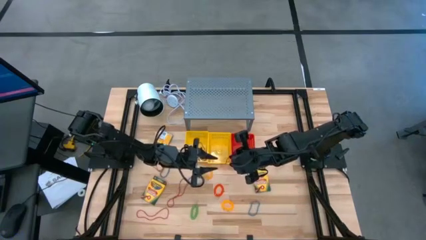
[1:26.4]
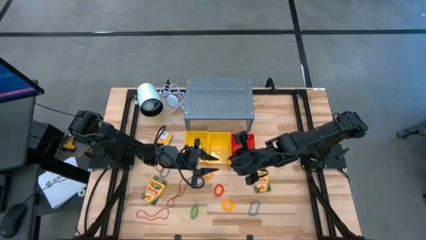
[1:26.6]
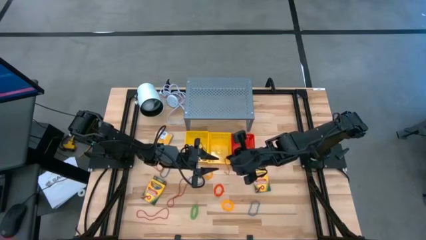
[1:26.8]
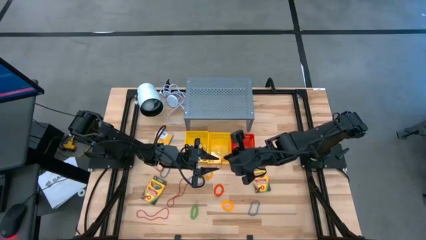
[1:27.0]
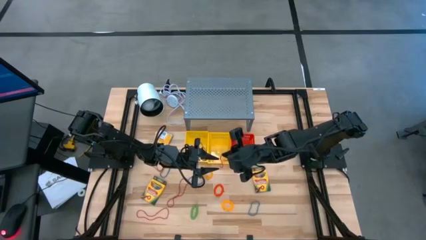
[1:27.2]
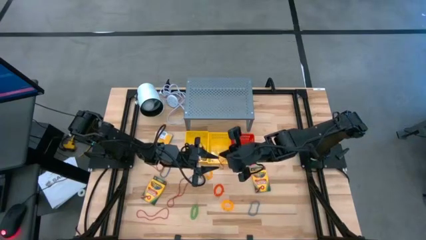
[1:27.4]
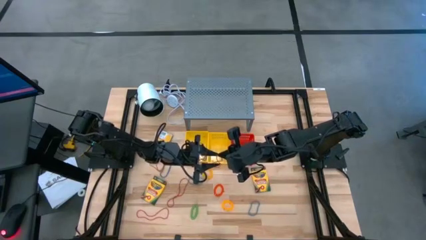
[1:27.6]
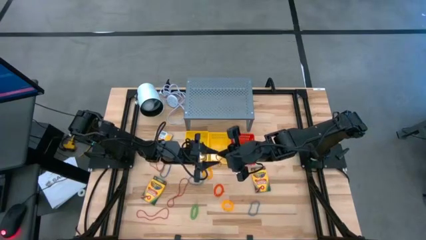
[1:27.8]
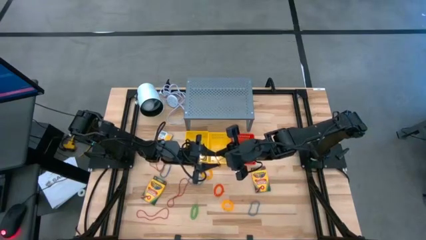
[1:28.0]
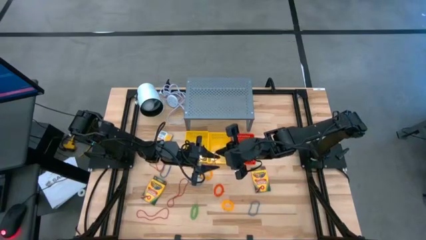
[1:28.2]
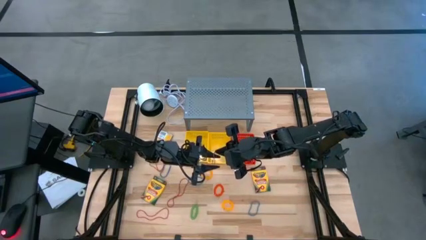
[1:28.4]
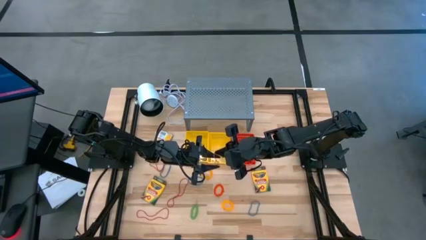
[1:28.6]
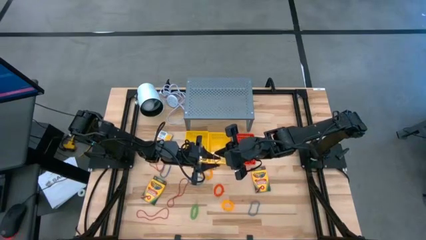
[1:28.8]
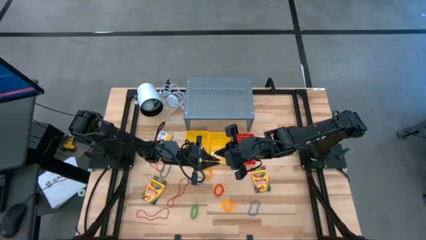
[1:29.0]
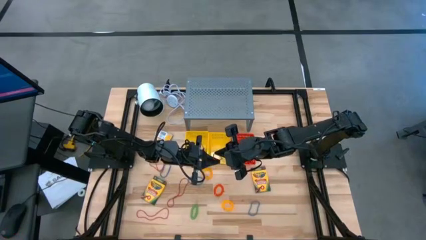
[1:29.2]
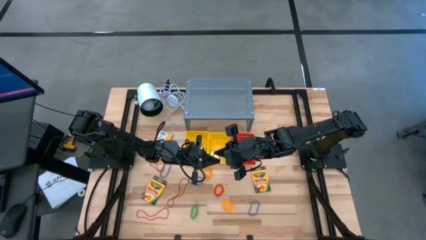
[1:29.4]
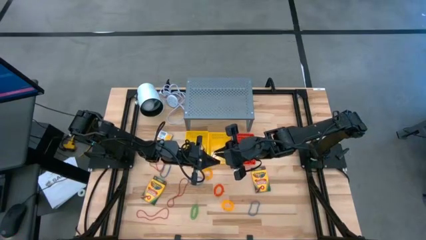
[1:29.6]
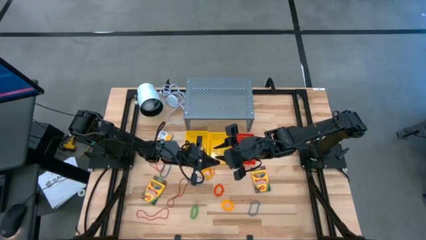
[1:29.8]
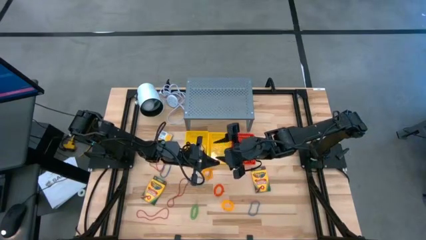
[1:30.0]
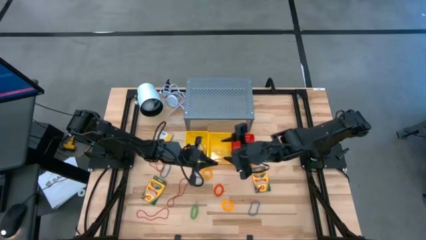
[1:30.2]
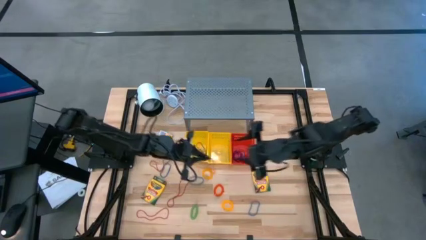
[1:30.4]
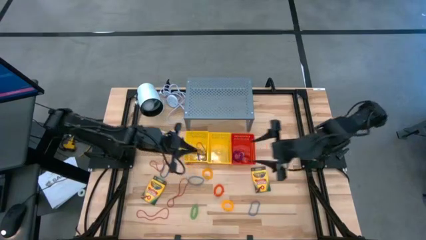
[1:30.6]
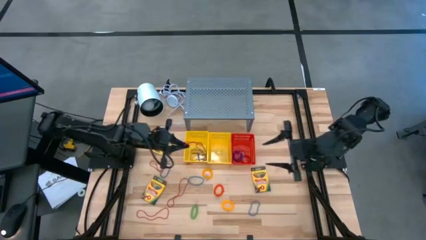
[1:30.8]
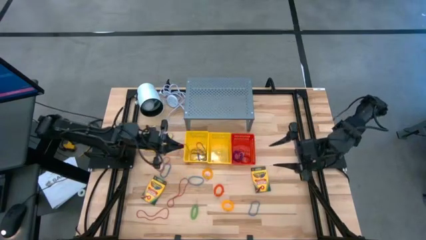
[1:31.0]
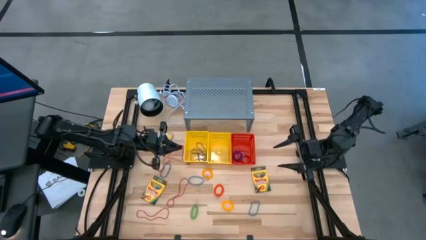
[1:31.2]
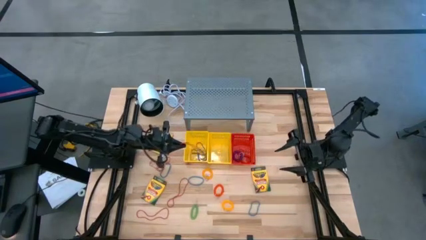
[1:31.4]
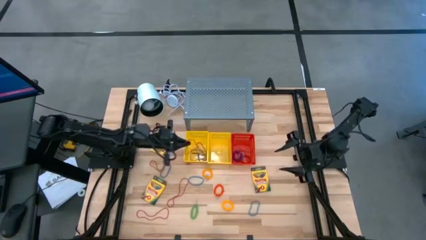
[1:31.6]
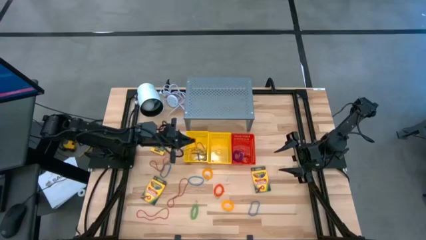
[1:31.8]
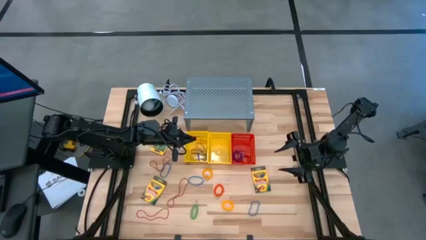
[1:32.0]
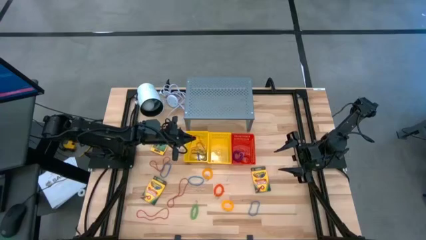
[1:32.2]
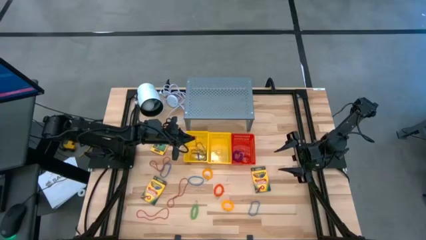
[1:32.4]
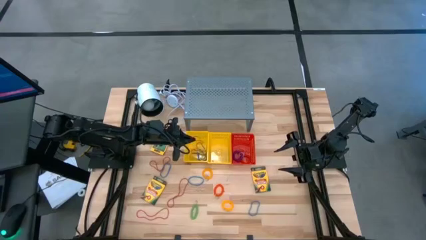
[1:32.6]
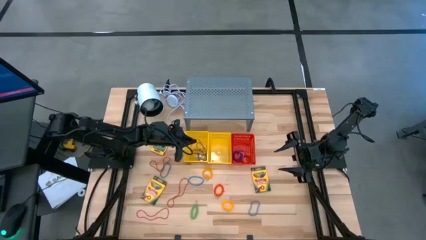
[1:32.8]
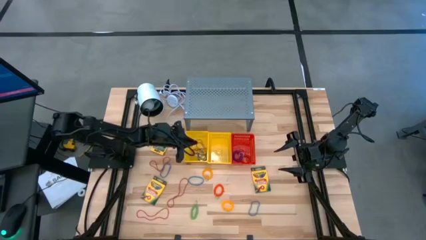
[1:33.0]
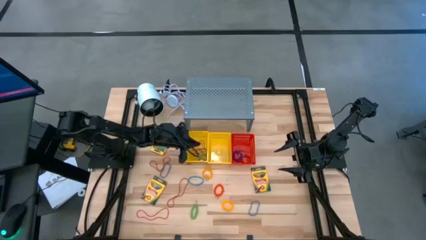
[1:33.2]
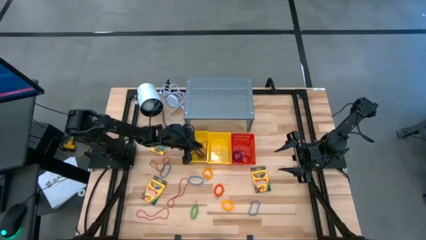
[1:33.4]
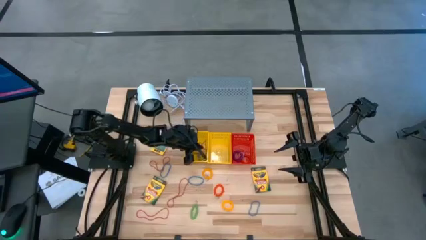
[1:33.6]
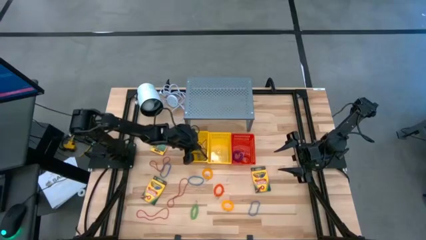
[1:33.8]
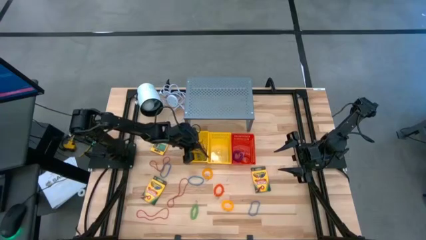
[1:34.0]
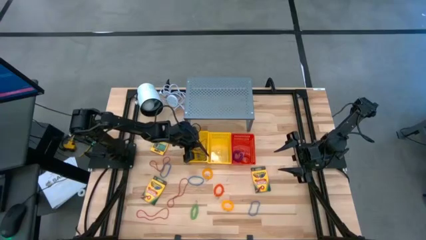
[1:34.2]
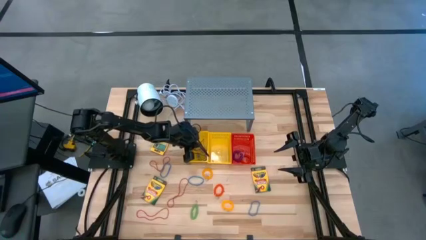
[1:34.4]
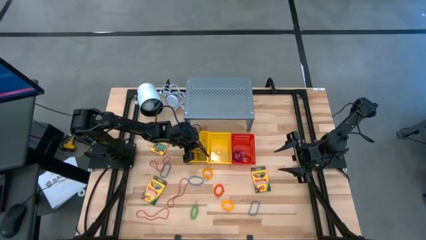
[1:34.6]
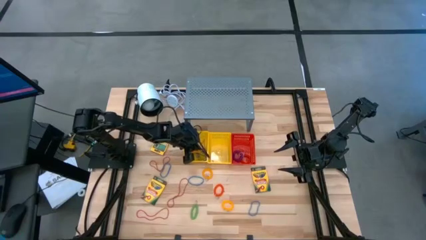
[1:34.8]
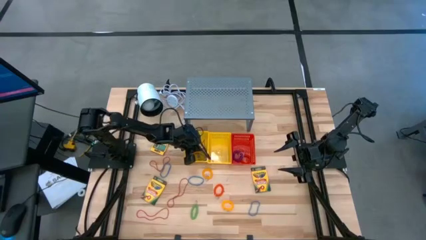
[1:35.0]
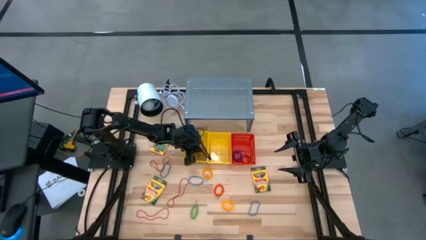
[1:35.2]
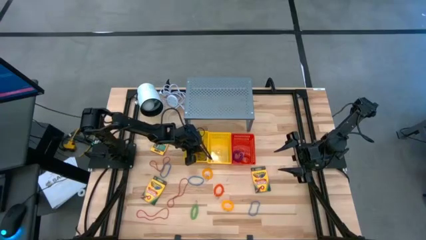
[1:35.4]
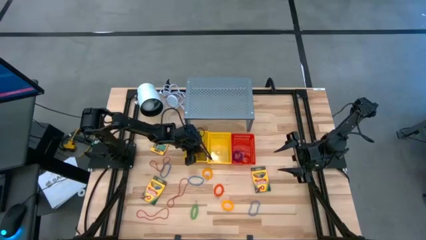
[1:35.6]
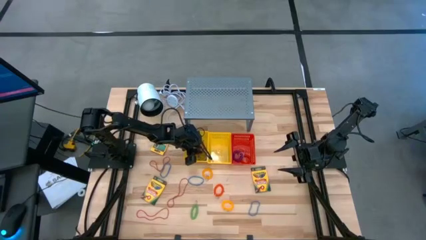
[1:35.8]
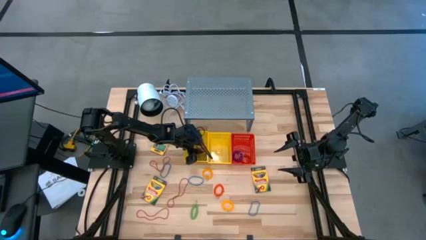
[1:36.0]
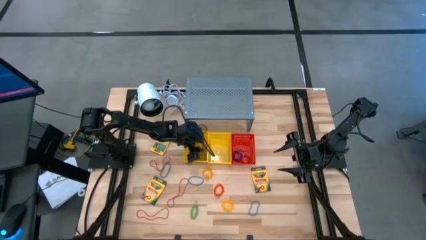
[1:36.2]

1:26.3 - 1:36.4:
Task: Pick & Place Office Desk Supplies
Put the red rubber band into the left yellow basket

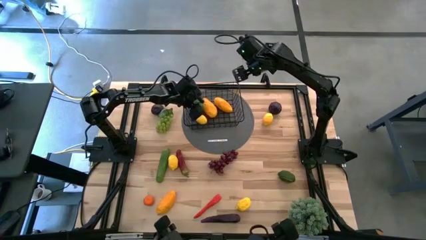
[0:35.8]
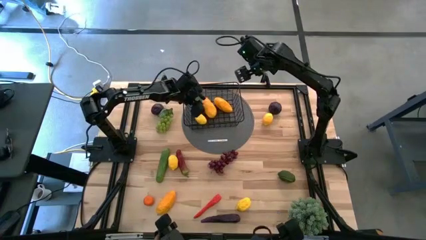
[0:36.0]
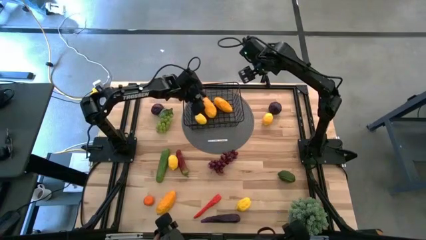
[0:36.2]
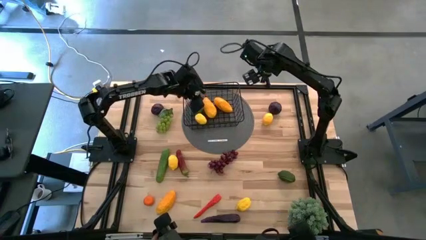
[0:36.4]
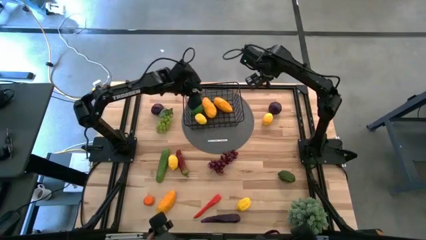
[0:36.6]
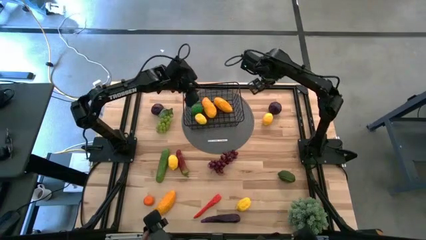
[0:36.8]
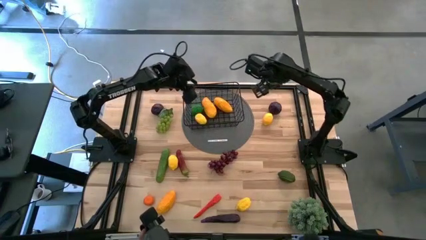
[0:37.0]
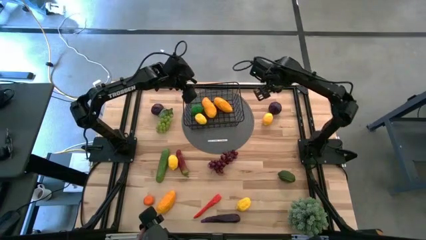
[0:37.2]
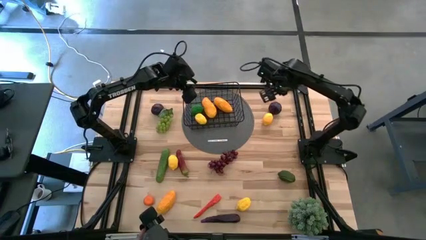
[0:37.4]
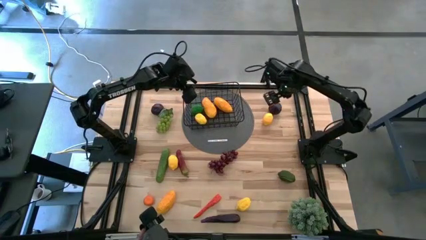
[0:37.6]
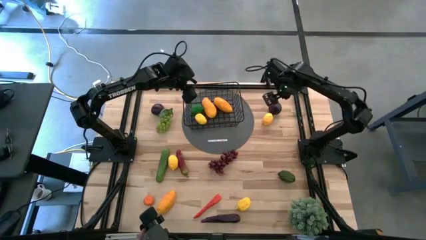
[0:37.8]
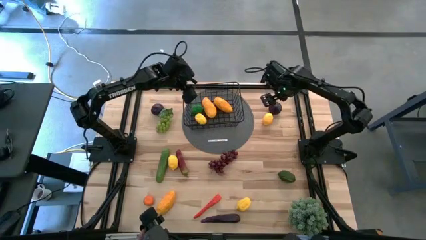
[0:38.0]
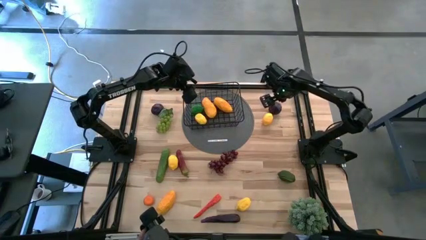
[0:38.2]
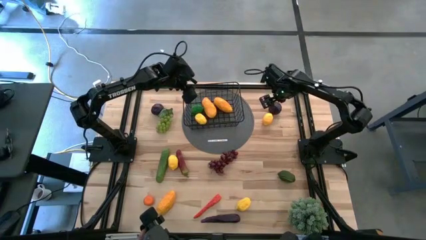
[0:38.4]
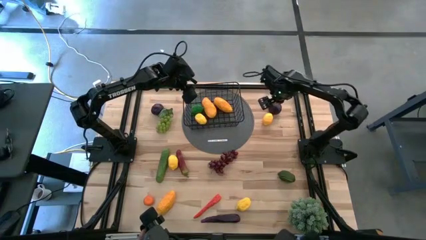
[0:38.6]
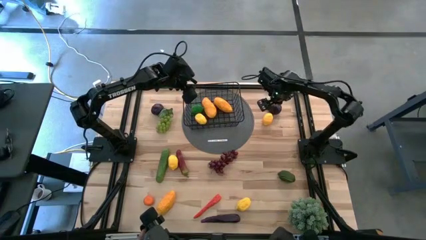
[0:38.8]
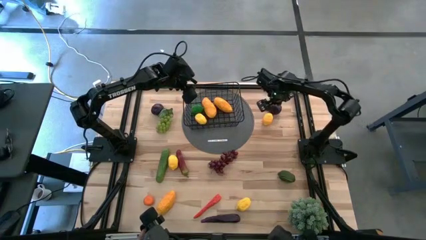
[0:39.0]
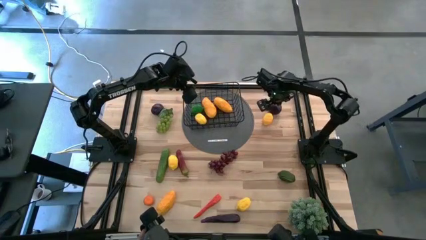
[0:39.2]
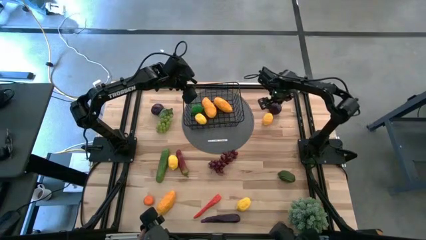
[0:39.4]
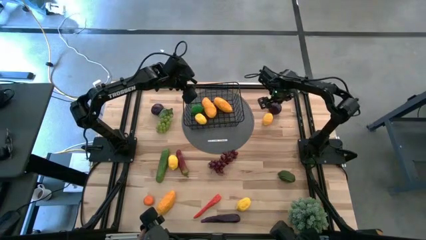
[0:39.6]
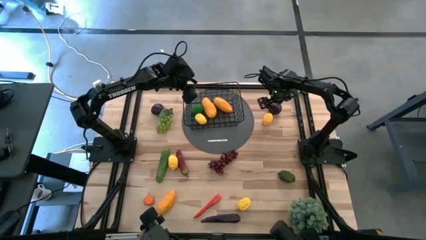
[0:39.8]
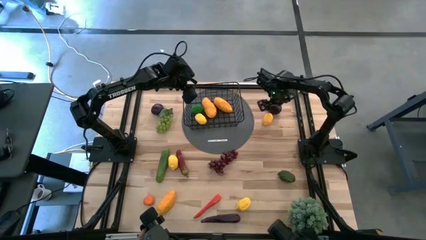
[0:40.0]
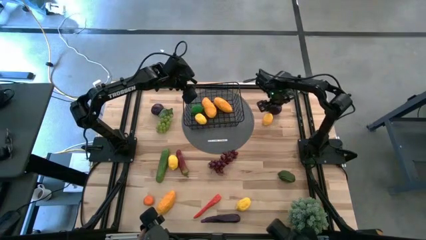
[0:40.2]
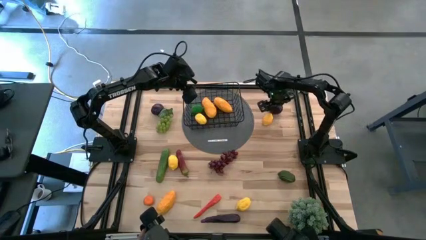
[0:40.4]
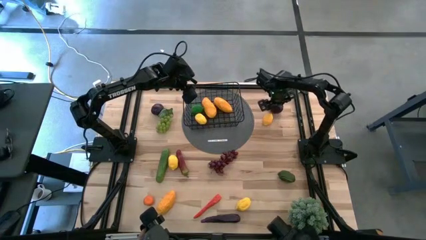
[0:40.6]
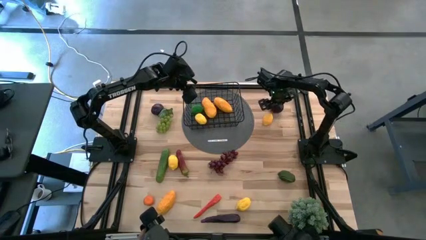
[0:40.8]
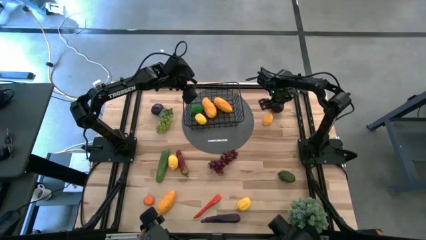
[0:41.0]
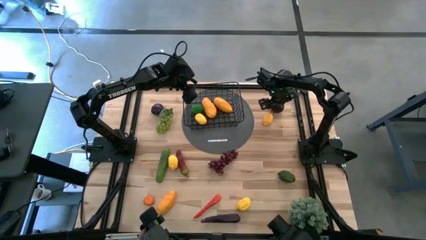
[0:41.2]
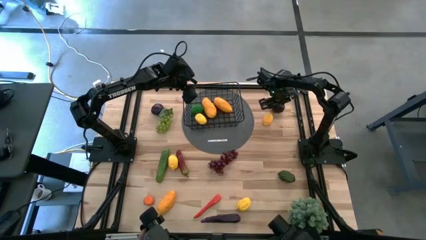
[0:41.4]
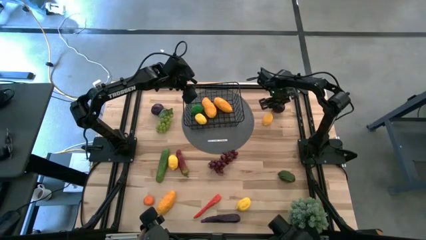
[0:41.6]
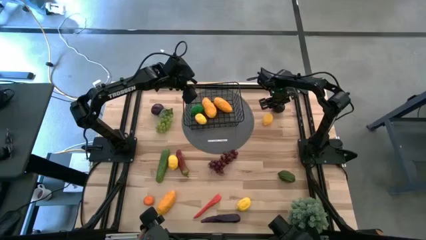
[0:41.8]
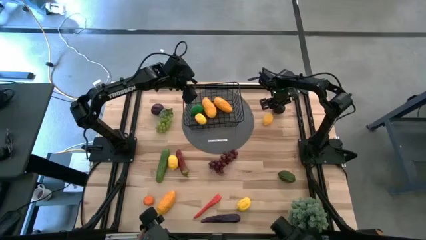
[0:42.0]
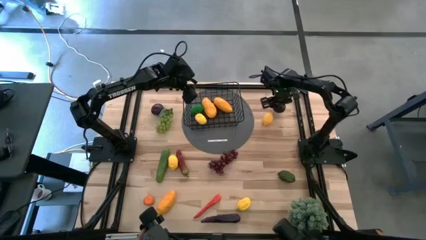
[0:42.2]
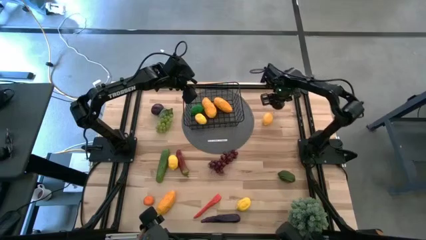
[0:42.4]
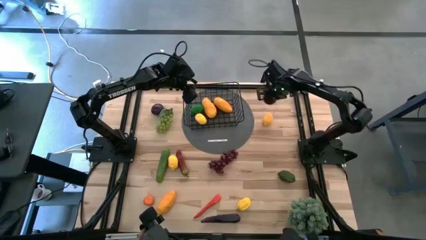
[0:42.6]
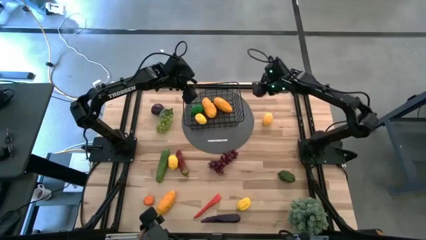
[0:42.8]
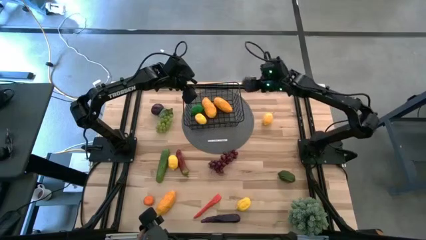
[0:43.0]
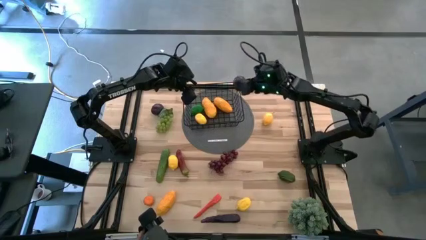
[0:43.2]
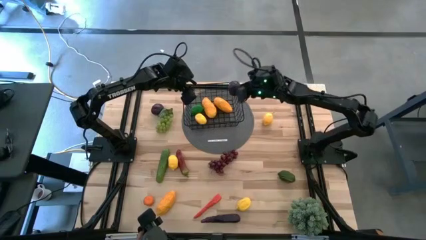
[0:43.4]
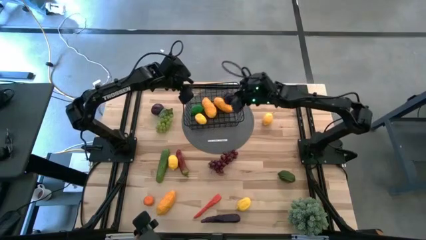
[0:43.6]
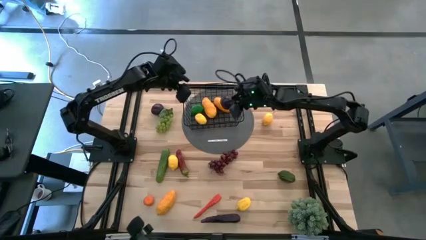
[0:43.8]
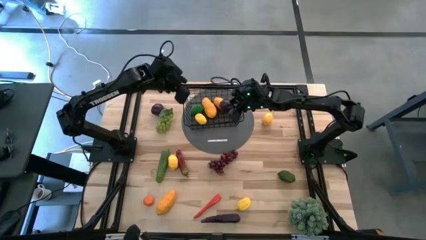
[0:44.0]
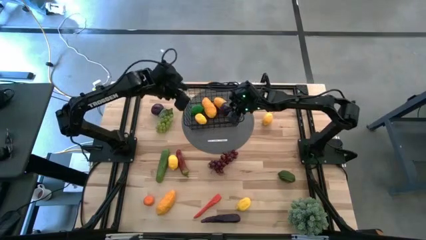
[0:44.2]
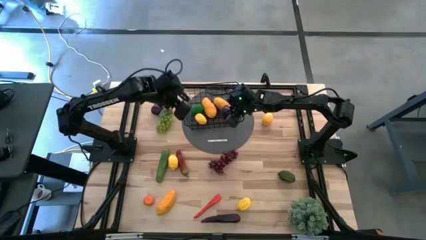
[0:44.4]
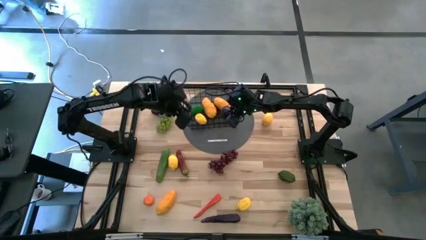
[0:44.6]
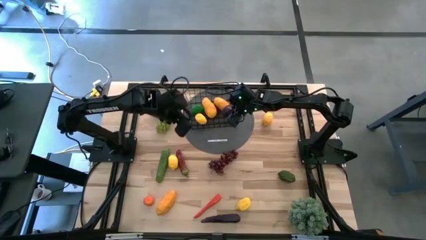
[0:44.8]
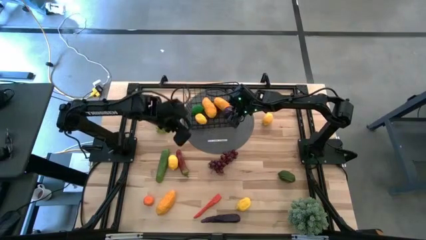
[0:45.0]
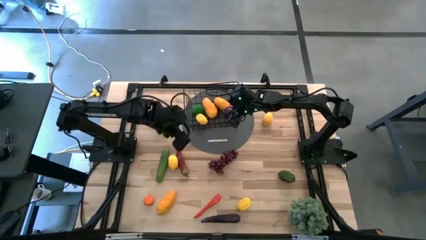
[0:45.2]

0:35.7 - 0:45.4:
Task: Build produce basket
Put the right plum into the wire basket
